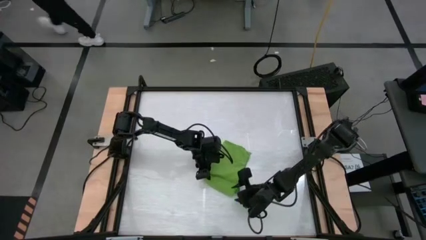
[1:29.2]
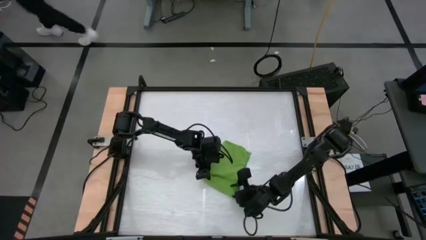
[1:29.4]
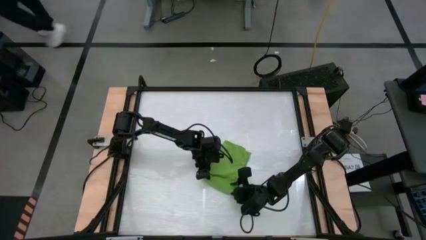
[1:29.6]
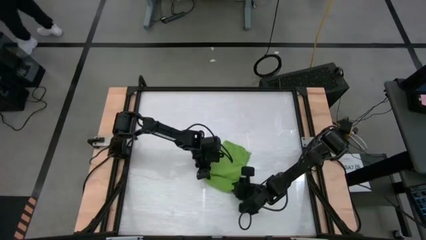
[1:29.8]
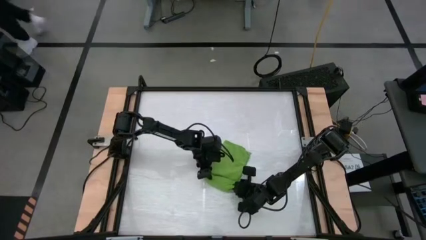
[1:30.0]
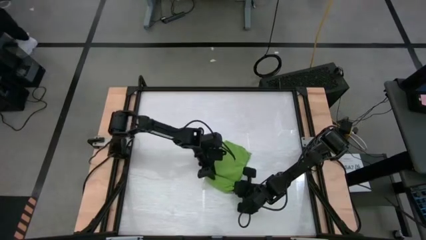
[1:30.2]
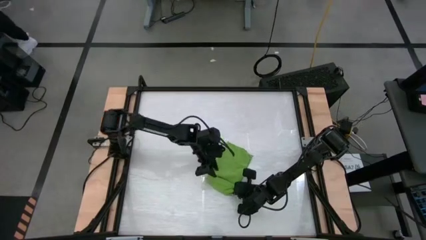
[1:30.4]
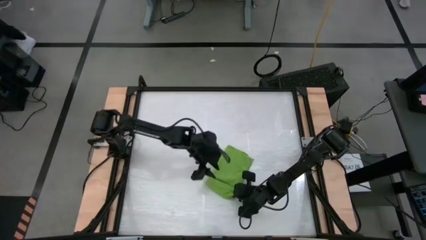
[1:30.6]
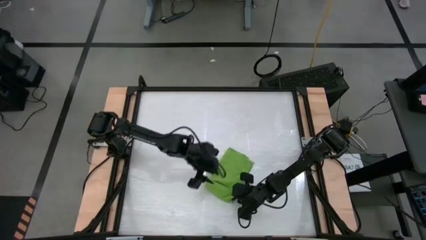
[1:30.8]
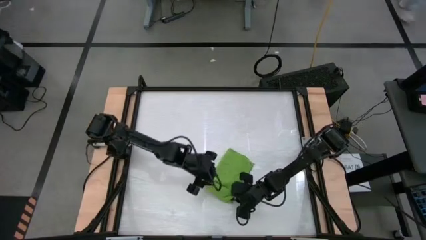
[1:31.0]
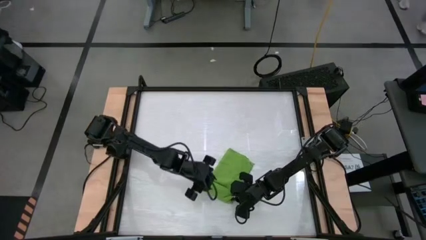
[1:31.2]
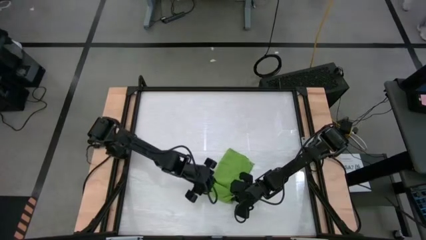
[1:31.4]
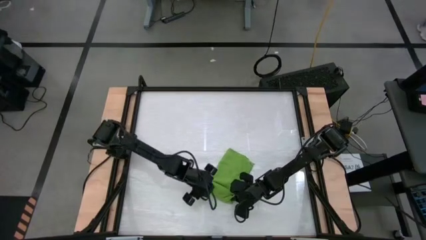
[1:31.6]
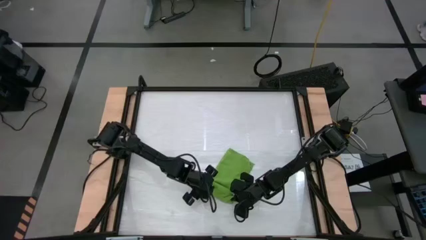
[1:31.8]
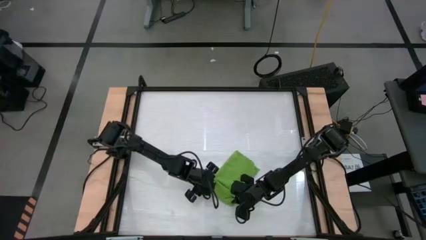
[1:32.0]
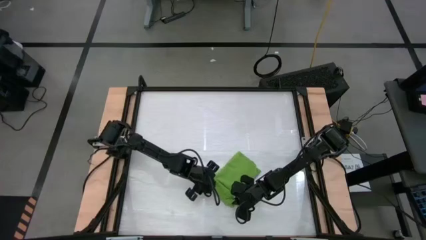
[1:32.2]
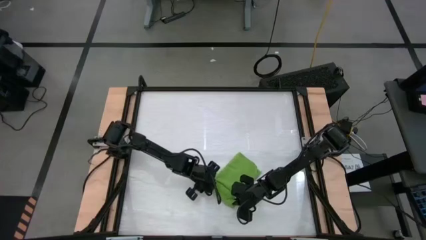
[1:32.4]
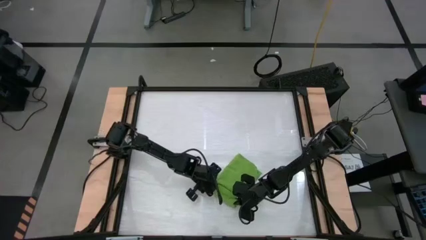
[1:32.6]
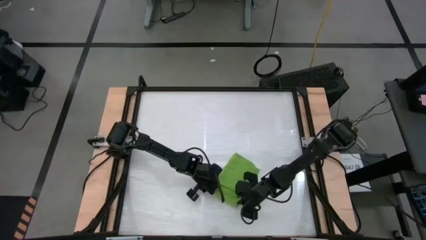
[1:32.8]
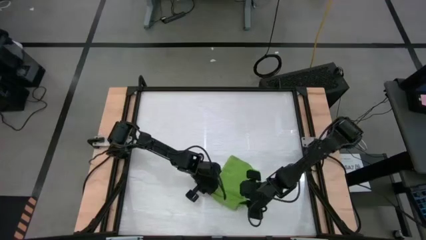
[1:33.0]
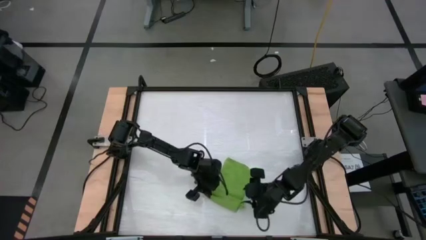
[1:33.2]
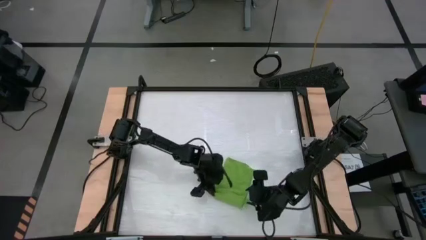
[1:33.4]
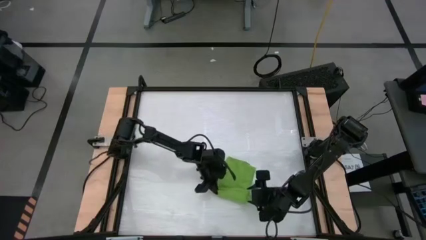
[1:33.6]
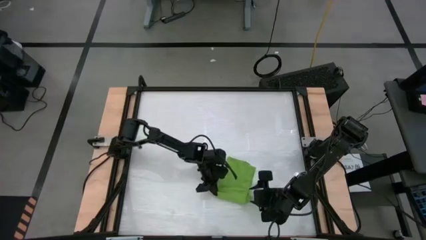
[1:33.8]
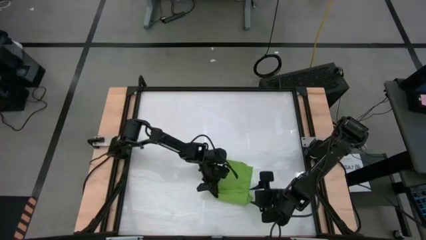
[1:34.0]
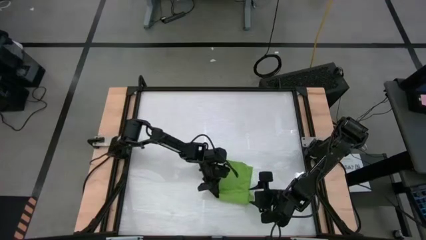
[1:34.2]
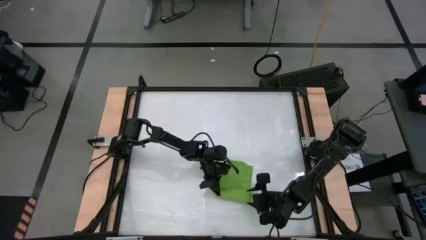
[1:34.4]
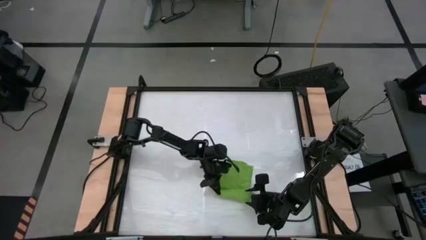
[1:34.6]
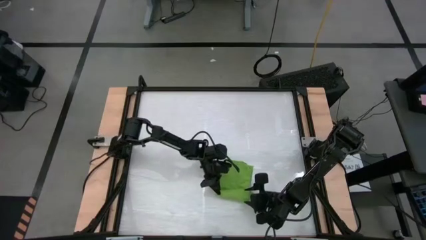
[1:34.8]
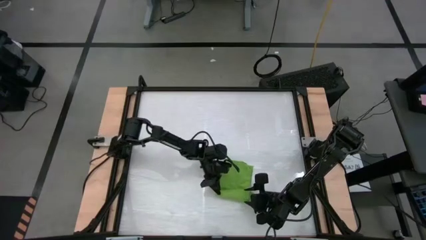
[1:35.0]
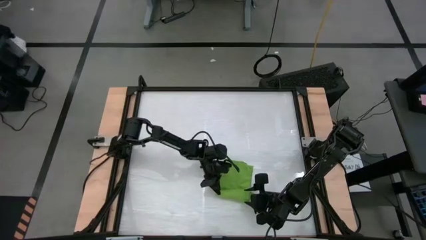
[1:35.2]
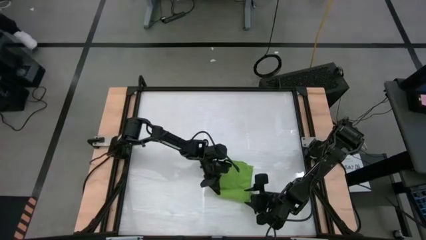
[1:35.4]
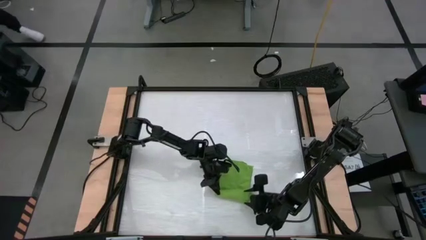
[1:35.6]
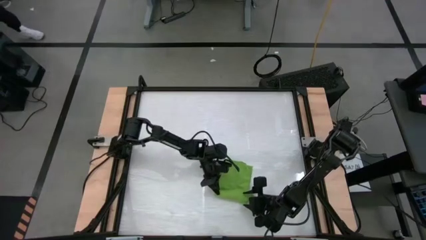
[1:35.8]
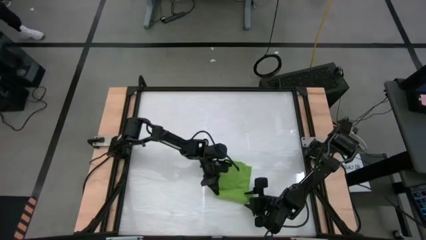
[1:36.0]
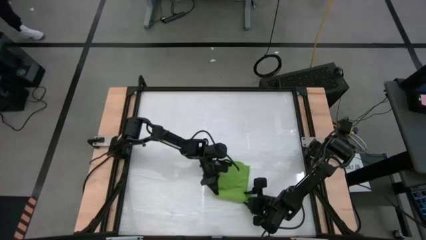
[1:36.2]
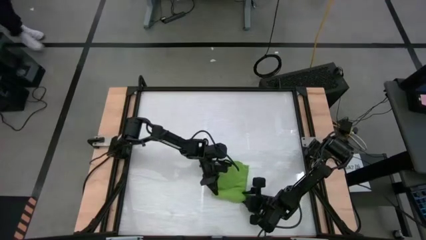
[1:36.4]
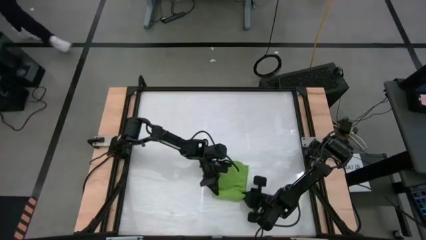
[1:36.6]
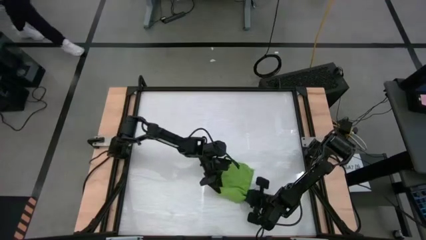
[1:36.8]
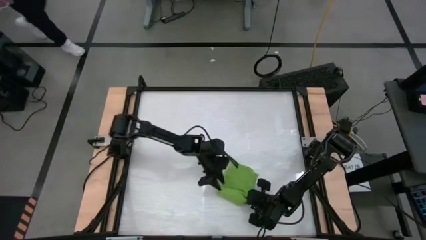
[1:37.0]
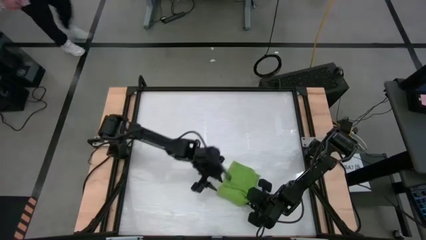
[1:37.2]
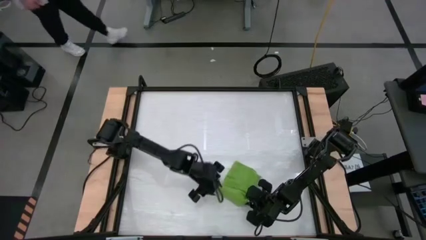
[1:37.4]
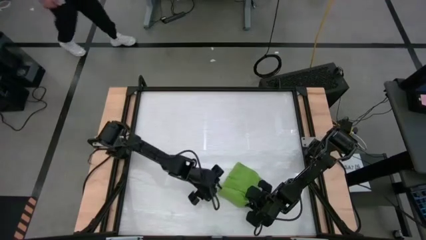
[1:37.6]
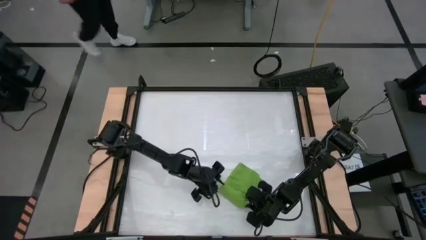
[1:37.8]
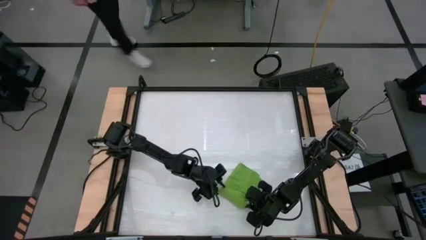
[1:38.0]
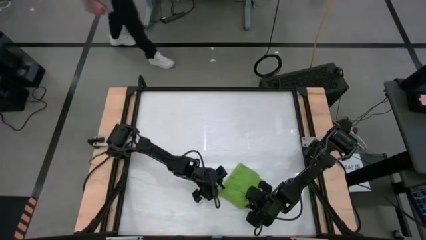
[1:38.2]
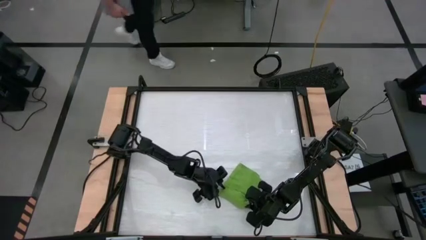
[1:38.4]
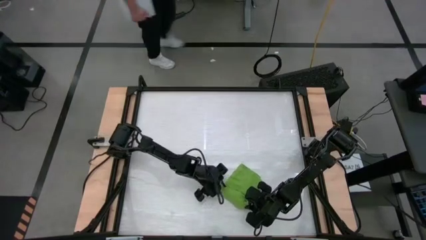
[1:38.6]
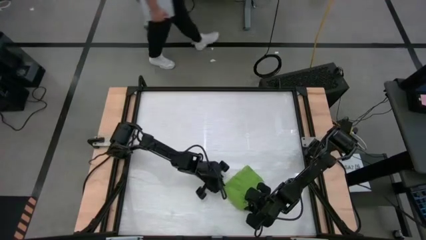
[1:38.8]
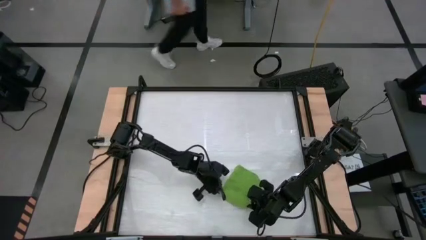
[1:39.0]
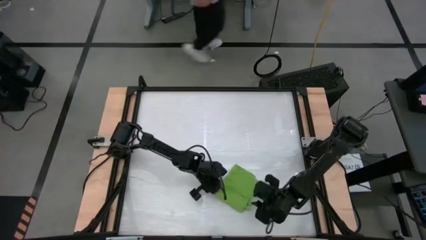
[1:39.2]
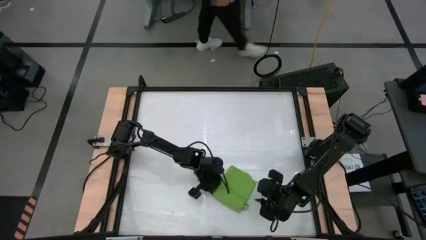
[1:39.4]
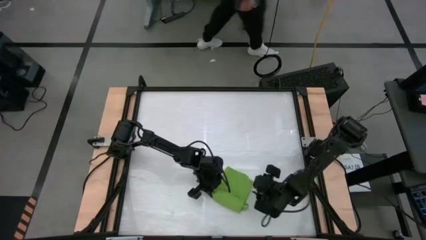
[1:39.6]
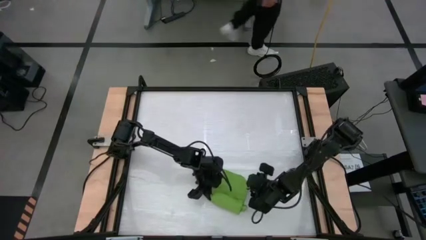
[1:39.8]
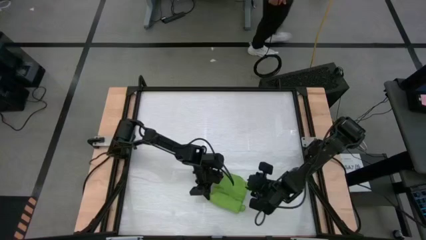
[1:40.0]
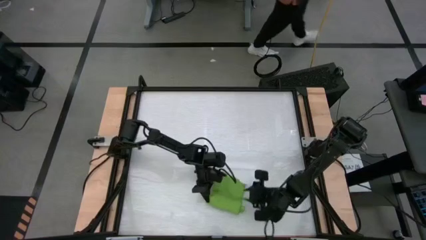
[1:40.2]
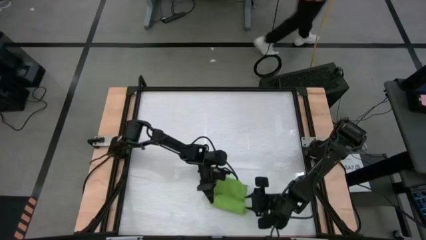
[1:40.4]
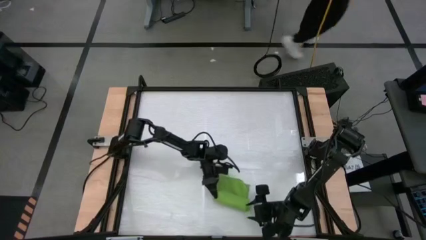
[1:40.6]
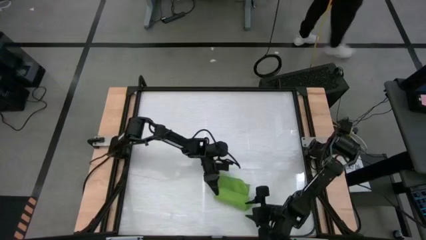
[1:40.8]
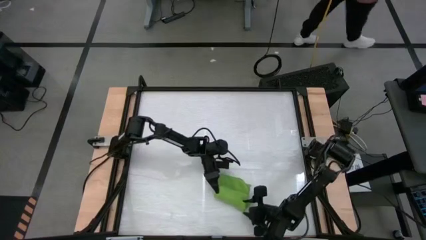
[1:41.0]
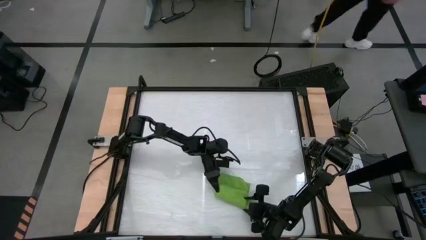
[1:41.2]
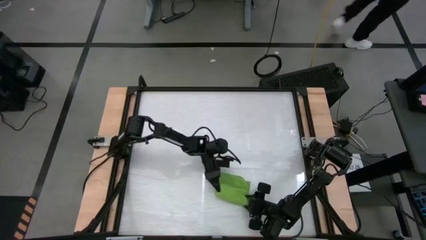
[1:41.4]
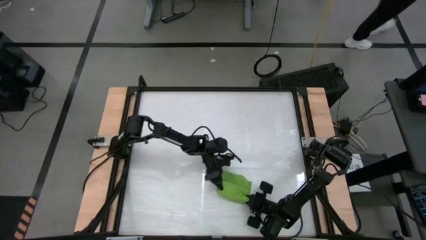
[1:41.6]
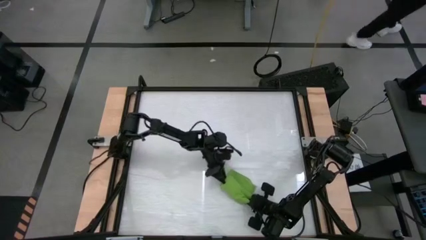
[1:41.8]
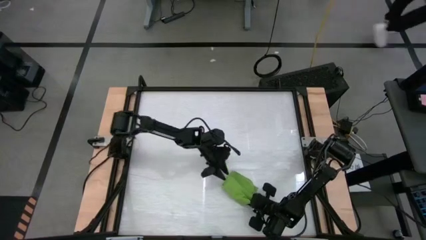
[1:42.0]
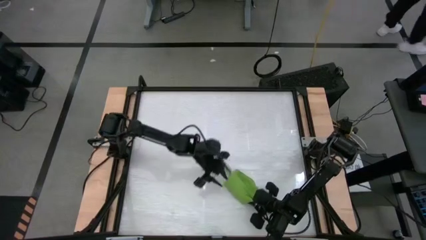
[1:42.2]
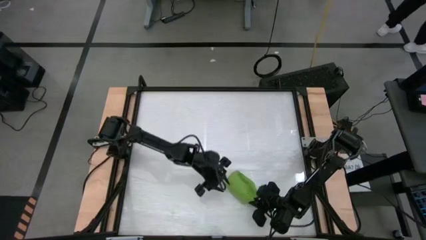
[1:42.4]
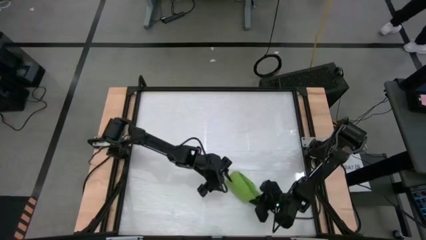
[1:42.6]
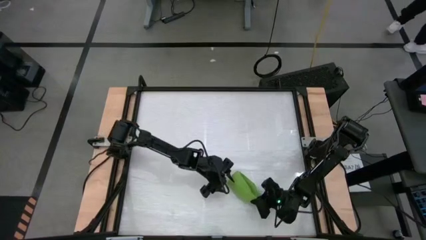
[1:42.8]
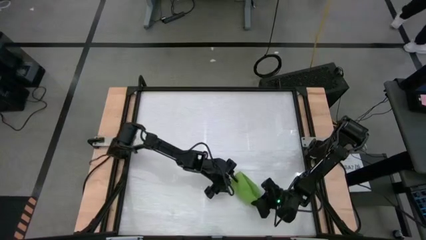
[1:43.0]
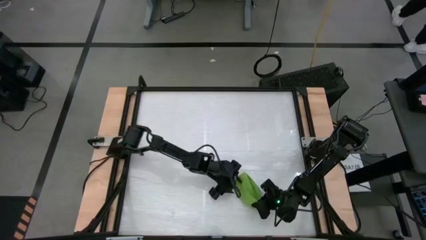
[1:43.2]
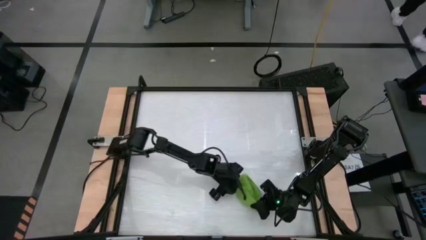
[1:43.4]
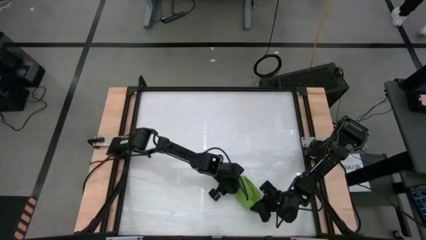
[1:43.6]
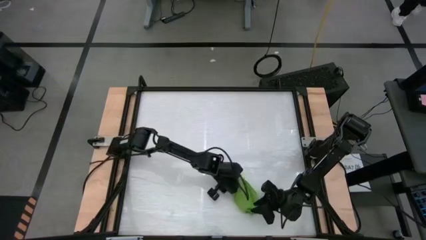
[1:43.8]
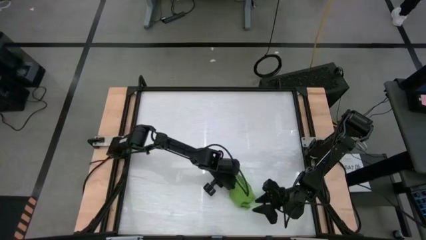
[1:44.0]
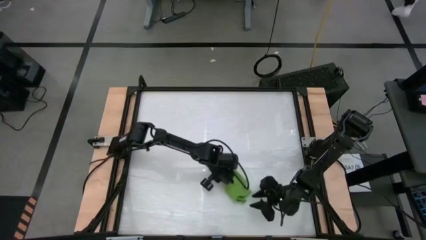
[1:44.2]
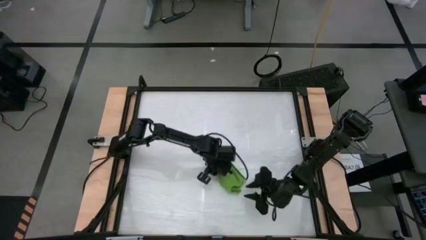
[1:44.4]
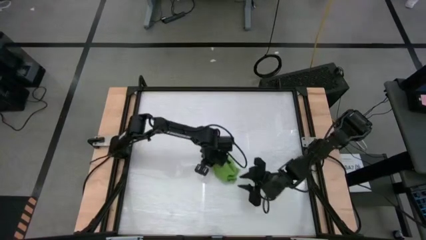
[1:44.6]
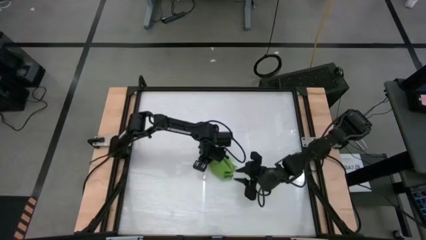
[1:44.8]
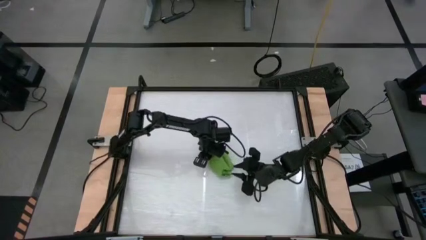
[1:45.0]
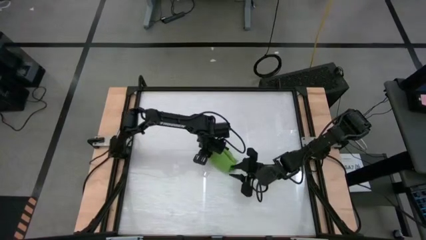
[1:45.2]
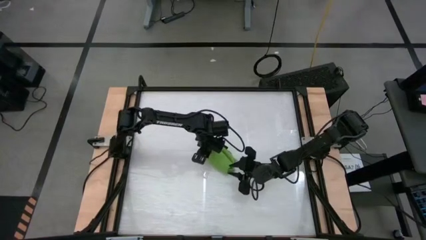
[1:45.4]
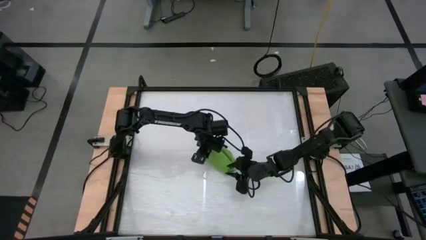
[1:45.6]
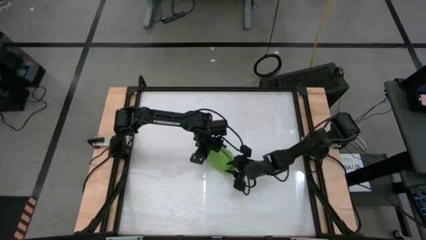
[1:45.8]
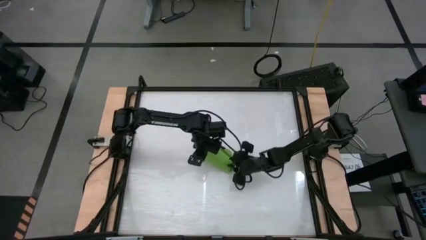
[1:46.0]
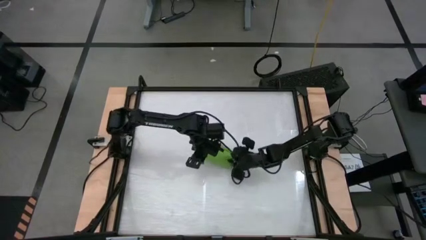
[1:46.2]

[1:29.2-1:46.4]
Task: Roll towel into tight, uniform cylinder
Roll the green towel
